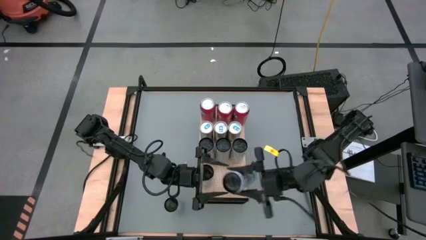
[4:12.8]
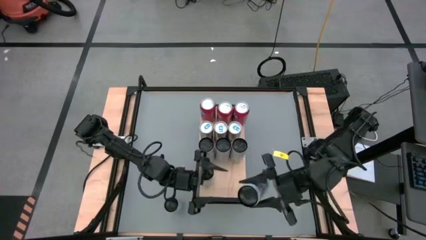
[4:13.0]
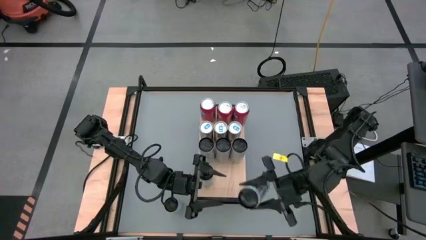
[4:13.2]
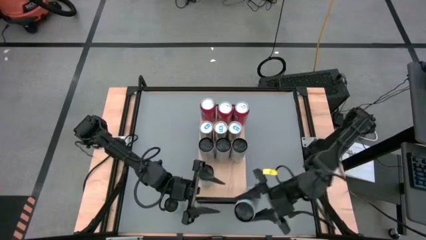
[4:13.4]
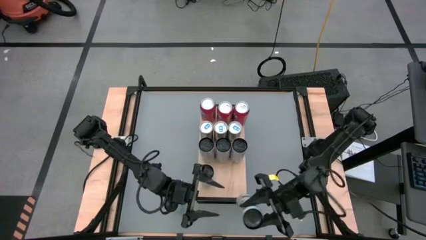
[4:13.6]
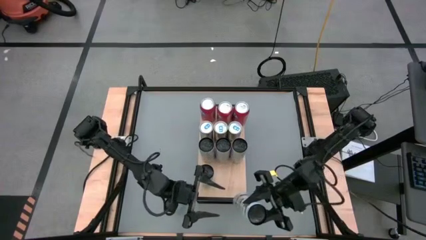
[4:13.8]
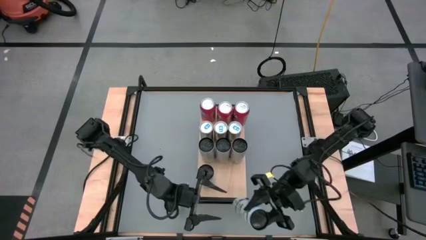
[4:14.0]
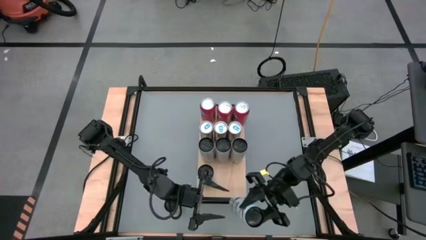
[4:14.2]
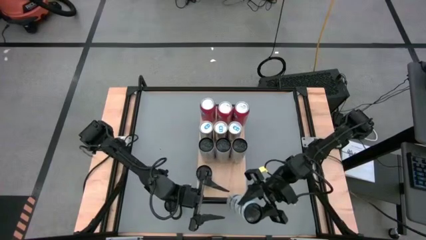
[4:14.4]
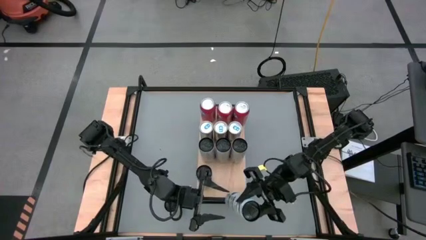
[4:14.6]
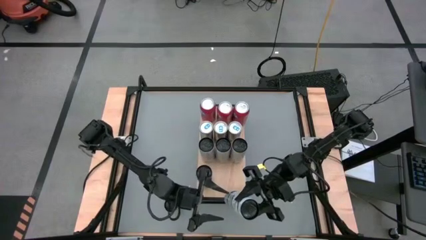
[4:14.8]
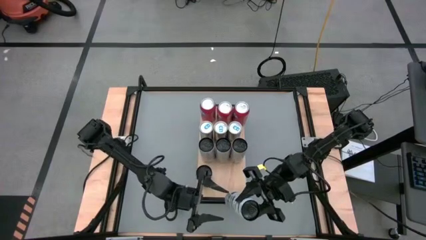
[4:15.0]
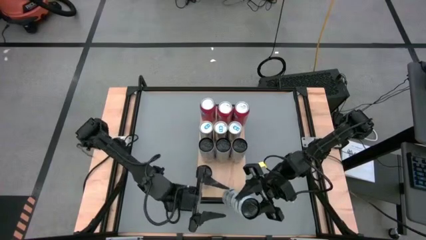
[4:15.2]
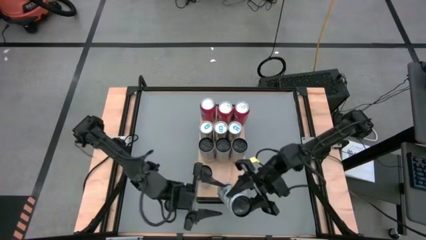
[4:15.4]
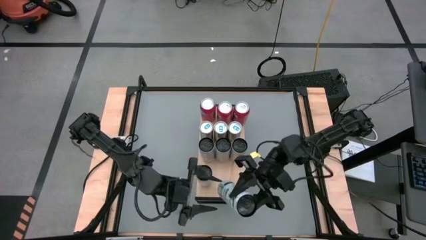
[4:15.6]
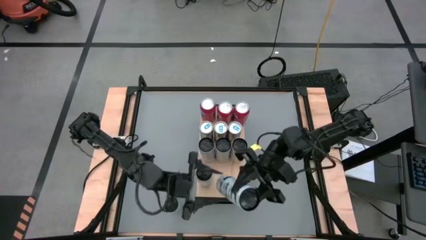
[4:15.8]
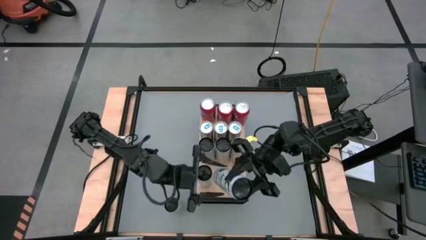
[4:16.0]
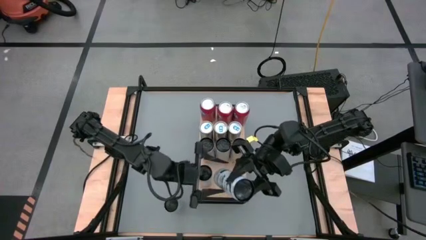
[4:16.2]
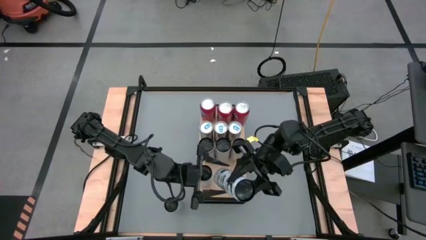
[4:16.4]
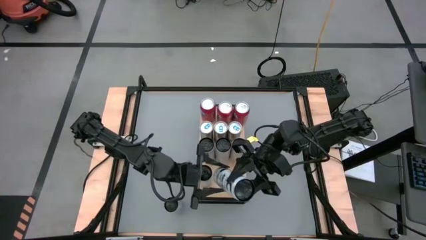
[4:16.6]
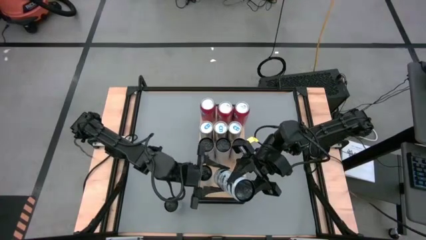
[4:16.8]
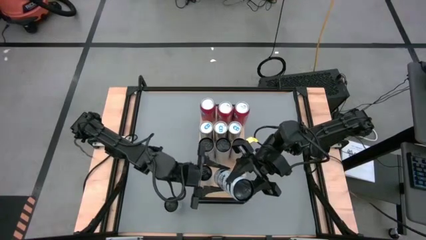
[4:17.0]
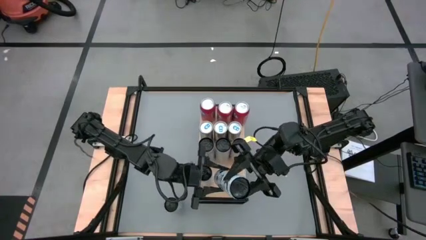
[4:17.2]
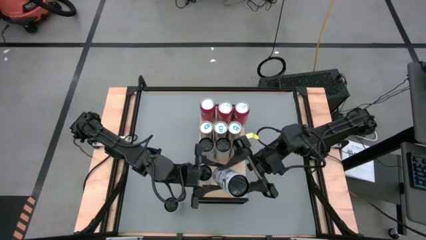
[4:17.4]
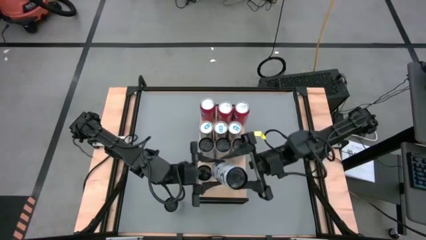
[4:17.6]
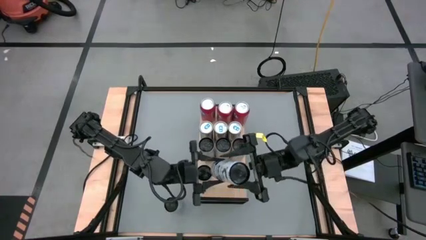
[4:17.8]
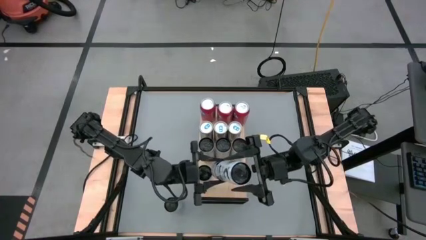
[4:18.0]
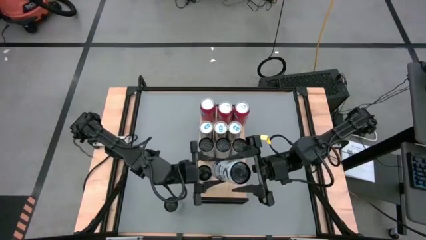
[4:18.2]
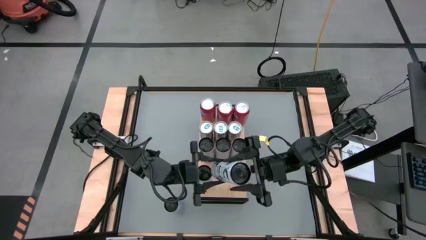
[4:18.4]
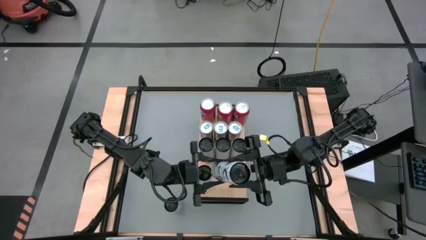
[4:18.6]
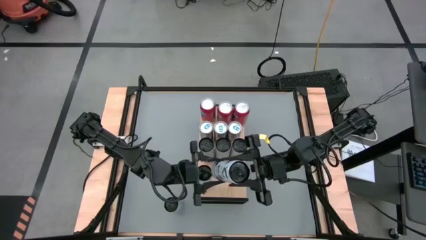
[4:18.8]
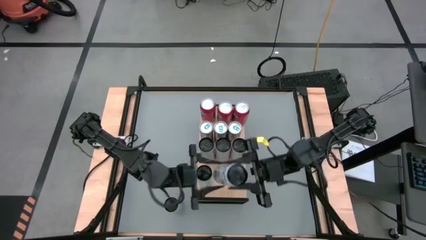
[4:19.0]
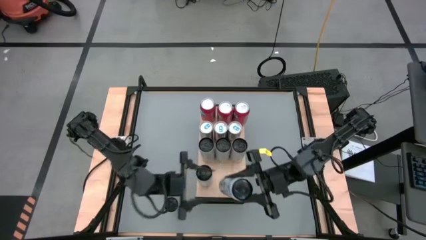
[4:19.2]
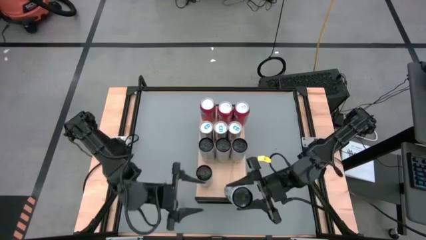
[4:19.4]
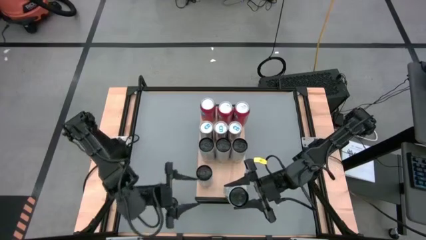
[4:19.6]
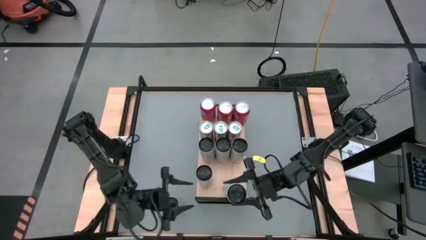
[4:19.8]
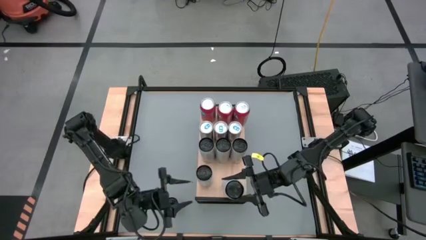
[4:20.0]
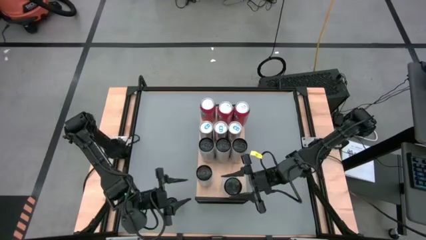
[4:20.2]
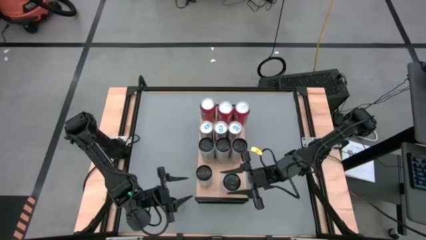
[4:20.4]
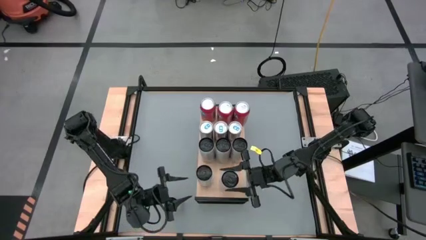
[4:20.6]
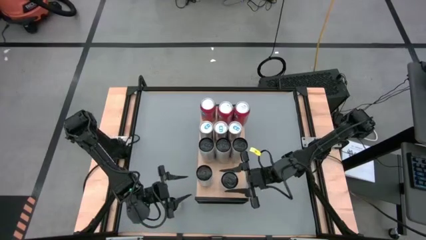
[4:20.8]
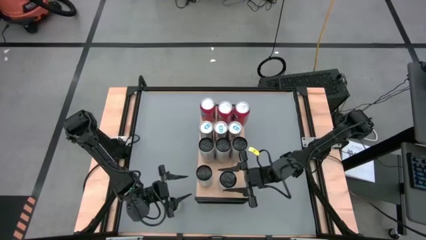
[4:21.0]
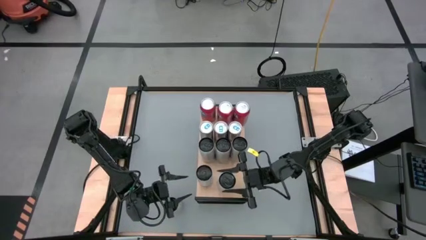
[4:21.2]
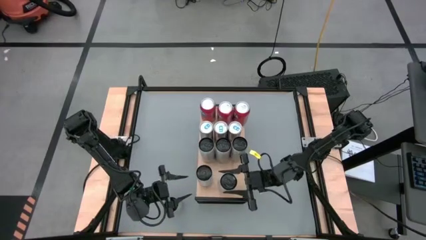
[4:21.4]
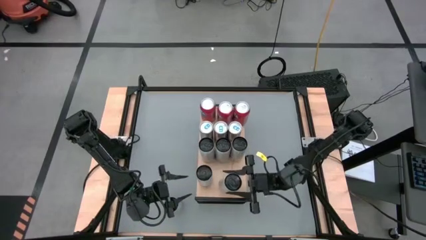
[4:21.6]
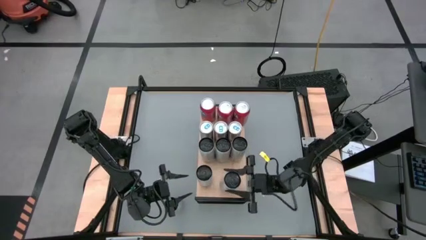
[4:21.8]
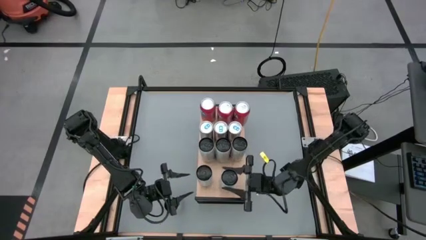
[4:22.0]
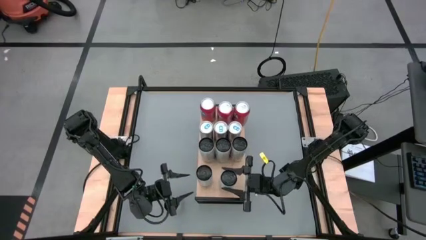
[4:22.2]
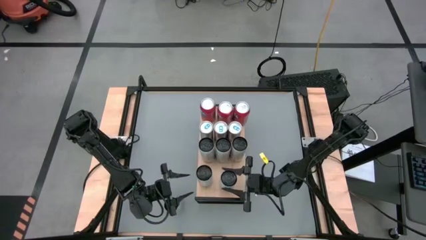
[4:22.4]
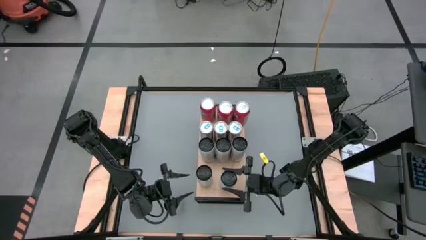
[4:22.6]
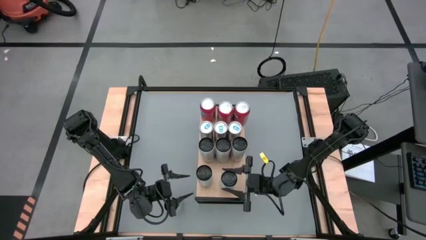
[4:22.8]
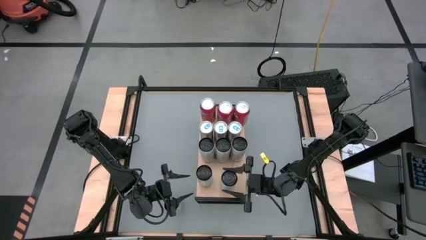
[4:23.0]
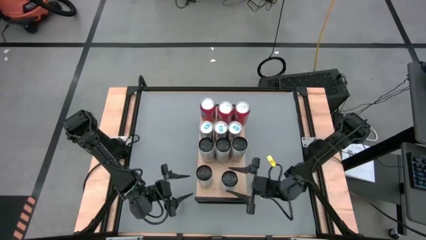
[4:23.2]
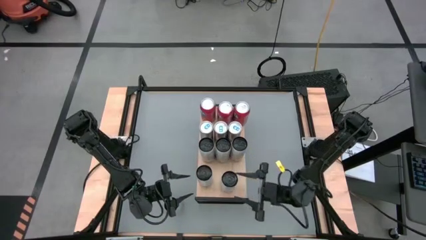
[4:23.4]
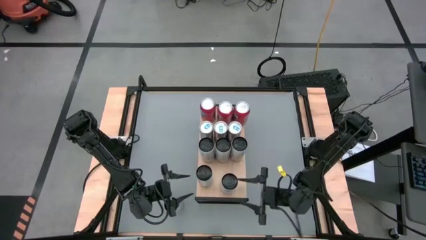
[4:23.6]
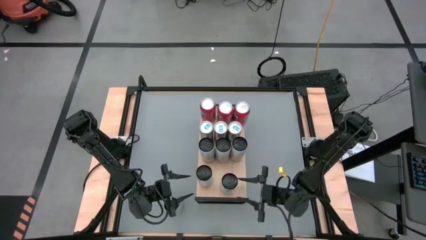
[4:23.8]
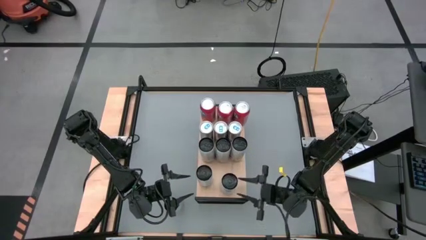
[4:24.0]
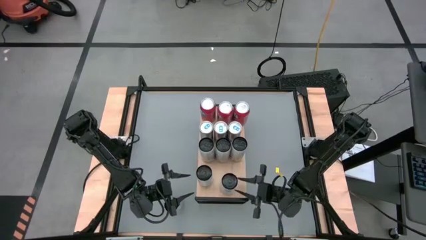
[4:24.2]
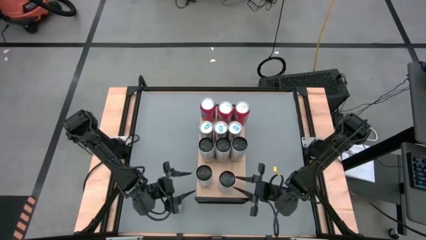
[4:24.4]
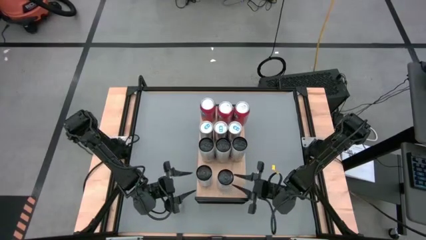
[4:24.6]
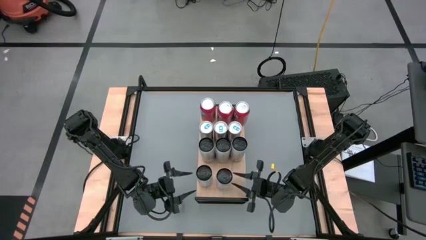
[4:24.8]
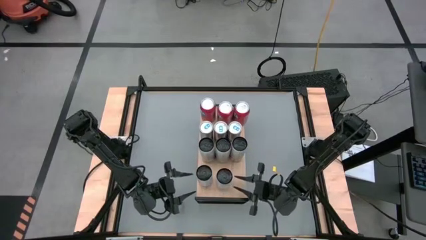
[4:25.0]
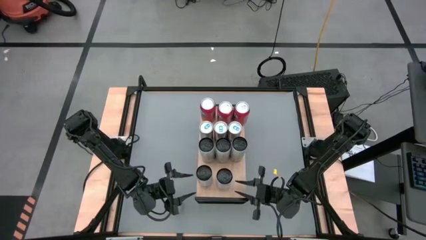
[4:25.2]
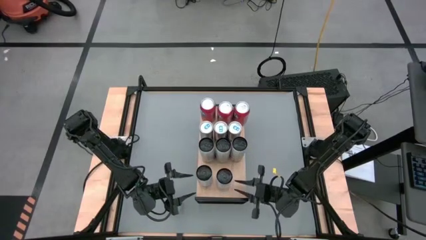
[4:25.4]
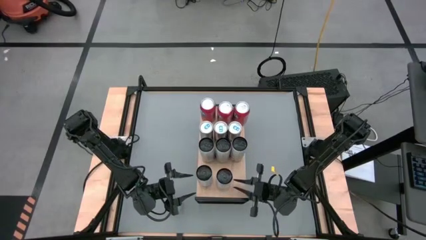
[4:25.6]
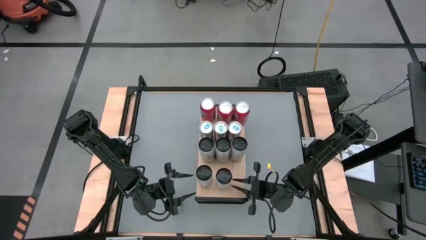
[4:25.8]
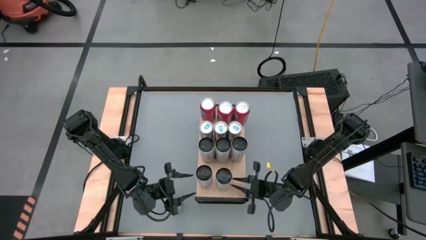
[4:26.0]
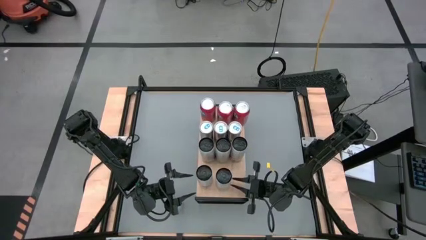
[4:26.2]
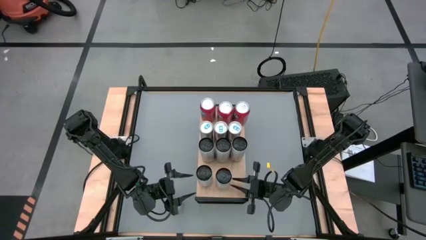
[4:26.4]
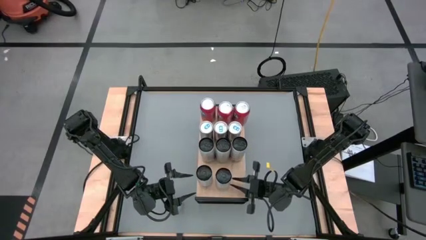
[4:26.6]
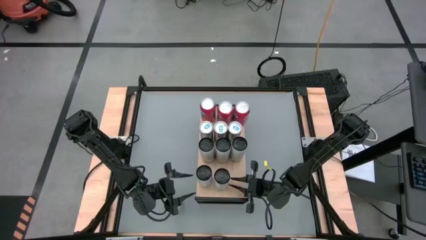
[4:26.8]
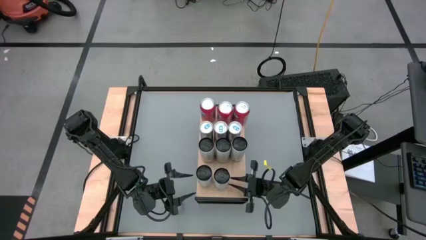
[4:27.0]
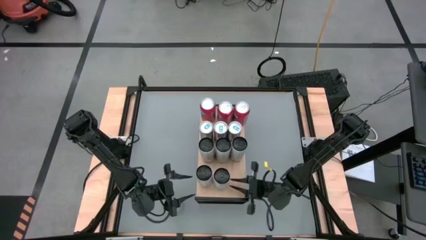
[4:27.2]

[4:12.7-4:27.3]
Task: Place canned beverage on shelf
Put the top white soda can on the shelf aligned with the other white soda can
